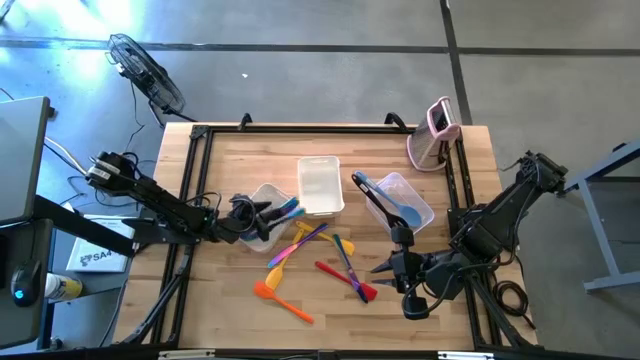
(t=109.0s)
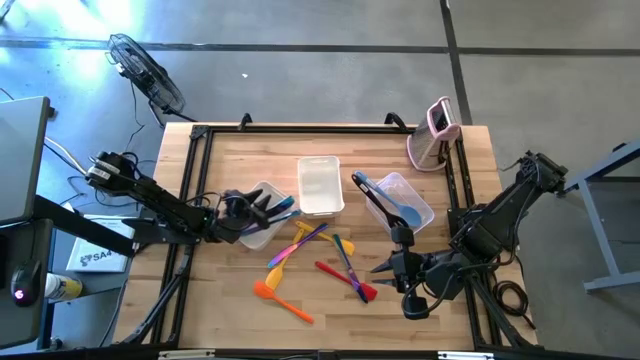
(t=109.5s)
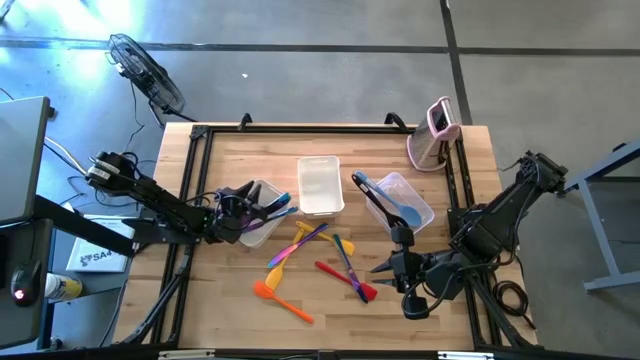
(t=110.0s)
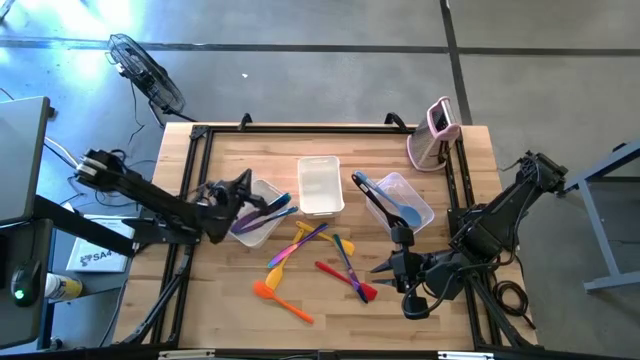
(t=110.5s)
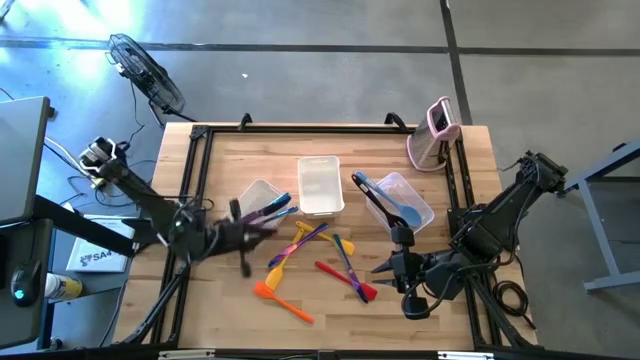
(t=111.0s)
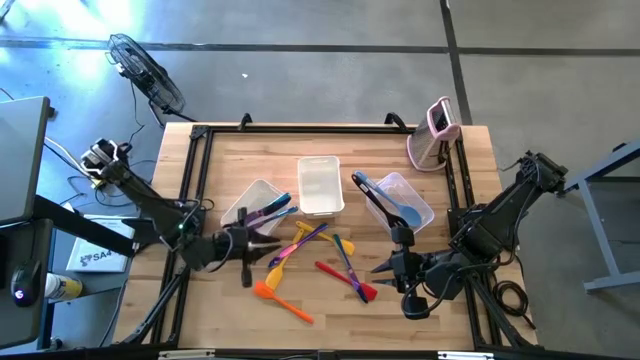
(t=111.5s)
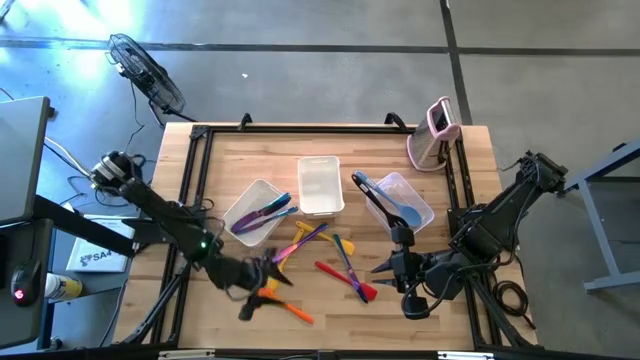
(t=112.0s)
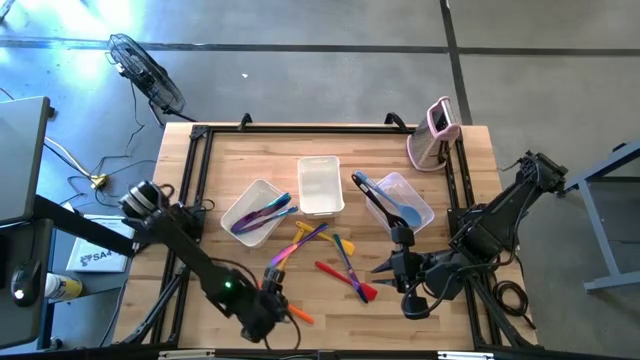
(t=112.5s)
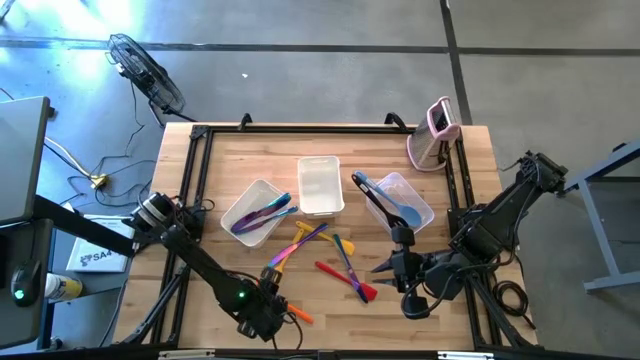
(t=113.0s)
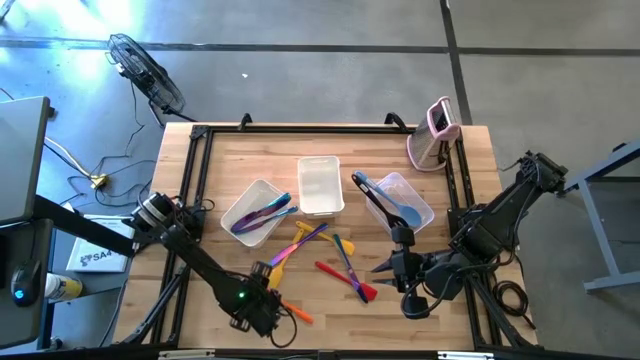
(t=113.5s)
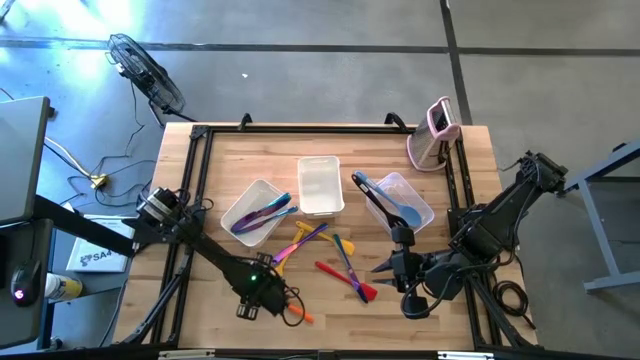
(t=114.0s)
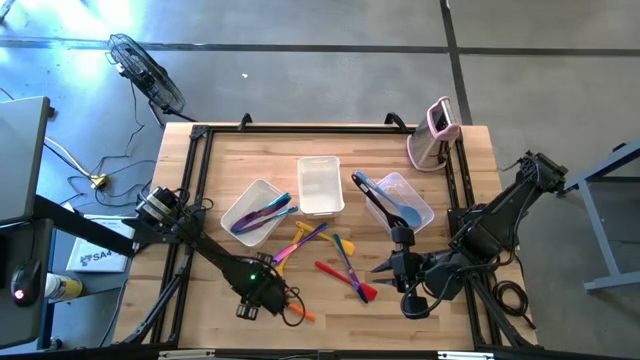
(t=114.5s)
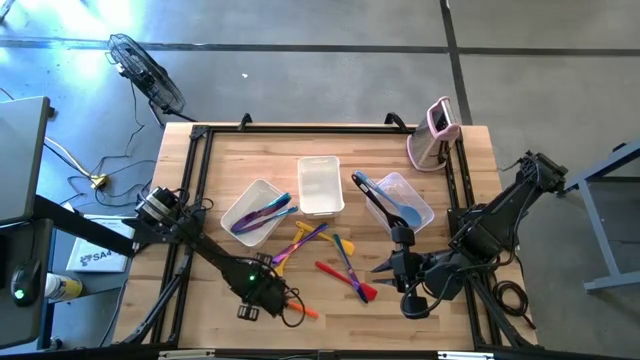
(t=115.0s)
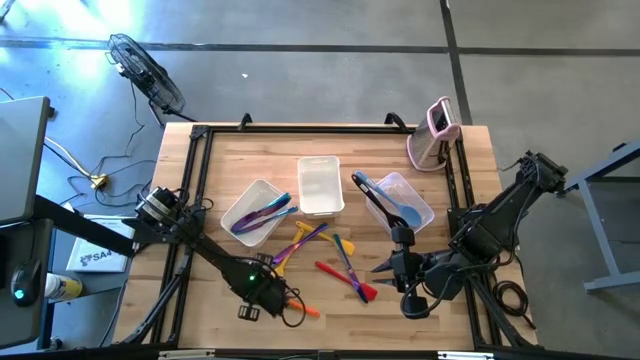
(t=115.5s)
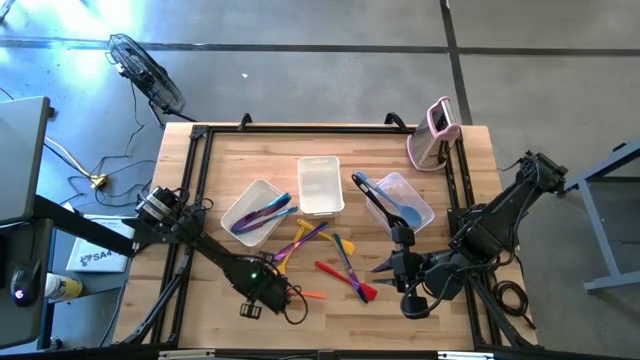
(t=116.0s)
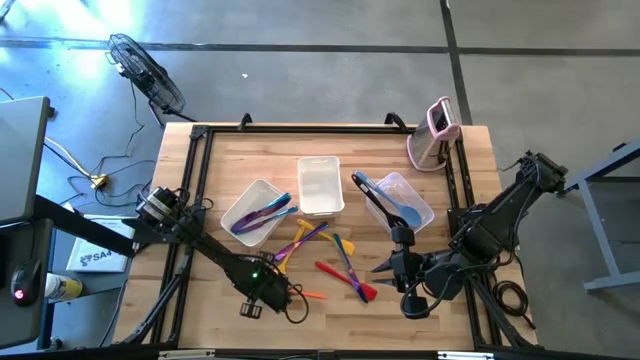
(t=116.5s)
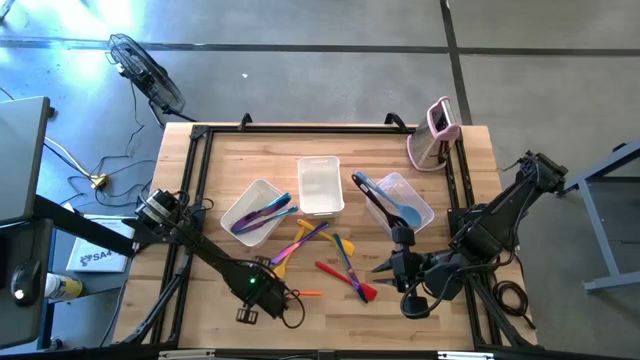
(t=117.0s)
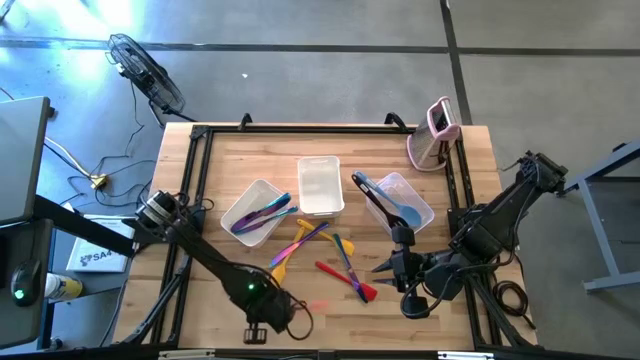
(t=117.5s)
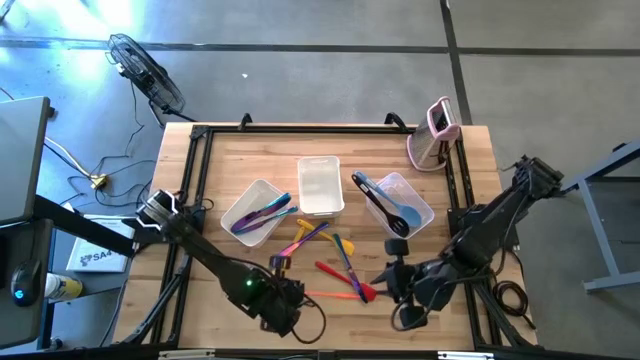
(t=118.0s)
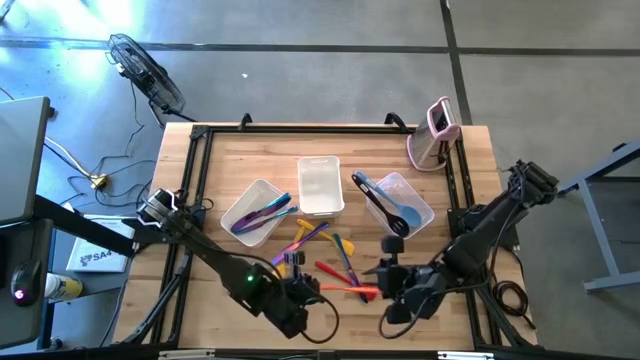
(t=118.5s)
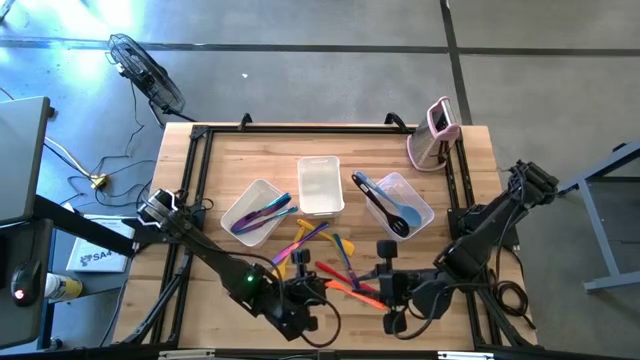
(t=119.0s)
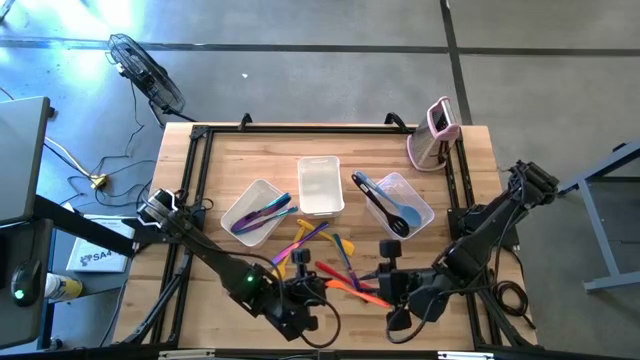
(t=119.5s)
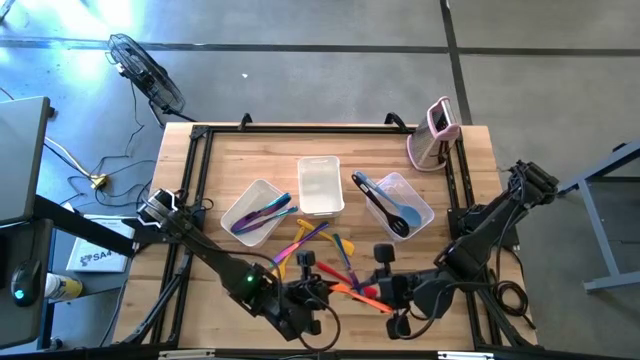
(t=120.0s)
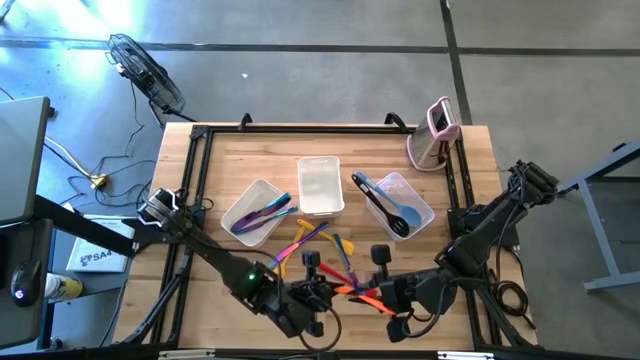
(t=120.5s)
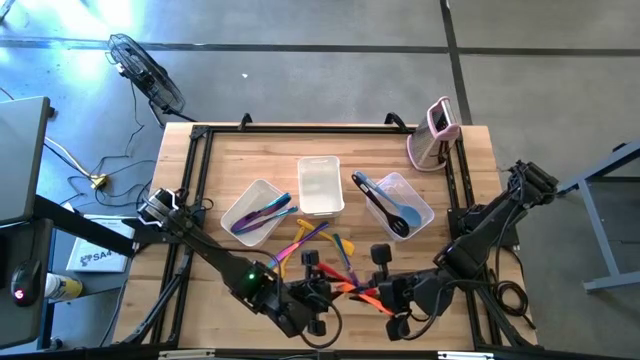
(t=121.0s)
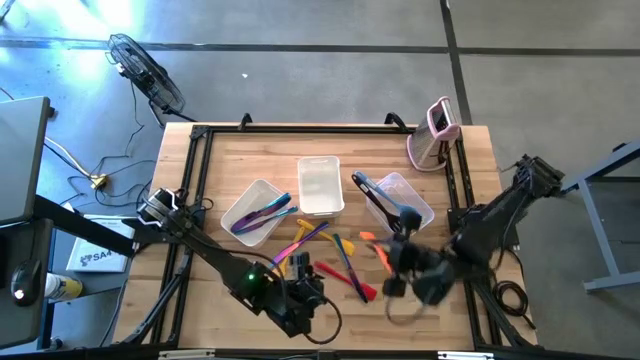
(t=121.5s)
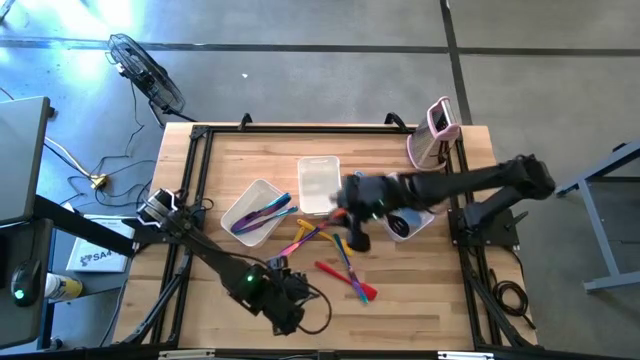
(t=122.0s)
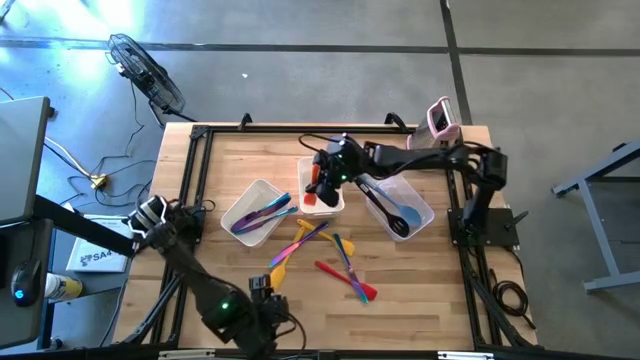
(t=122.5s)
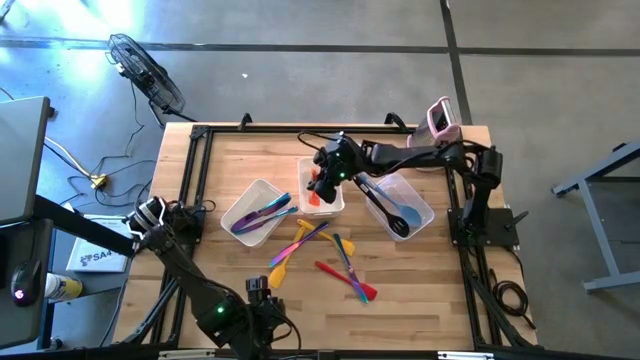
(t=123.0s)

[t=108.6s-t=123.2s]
Task: Pick & Place Kitchen Items
Put the orange spatula into the right white bin

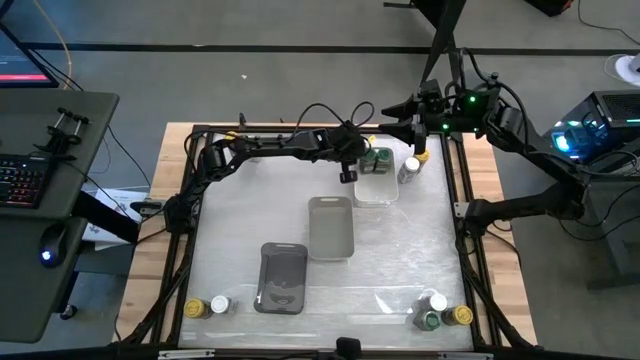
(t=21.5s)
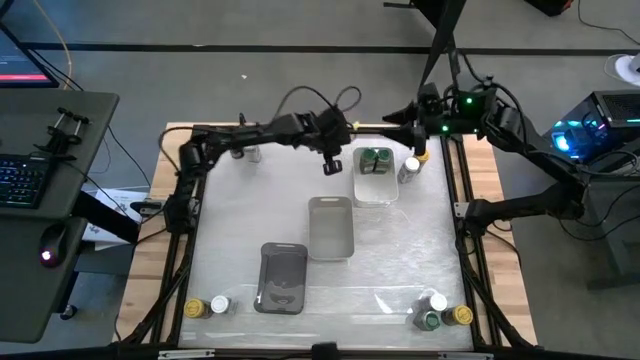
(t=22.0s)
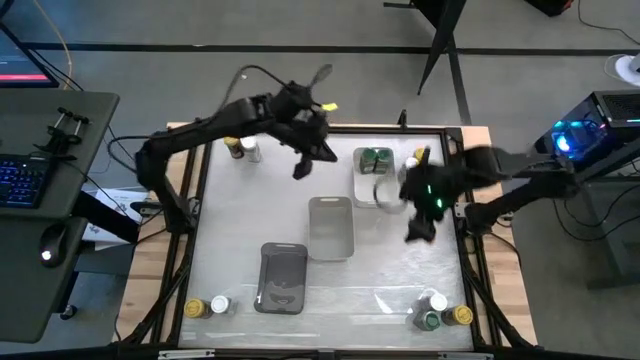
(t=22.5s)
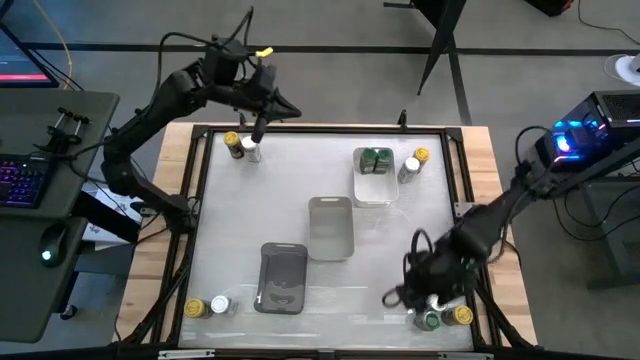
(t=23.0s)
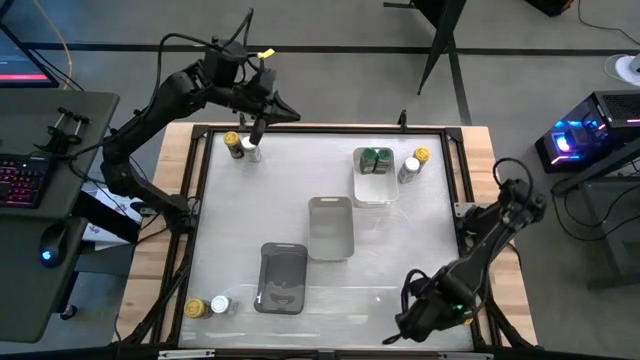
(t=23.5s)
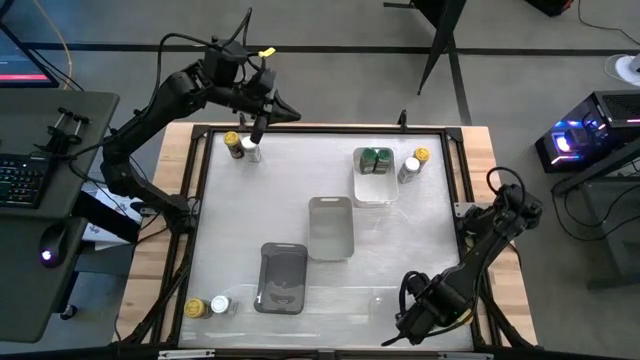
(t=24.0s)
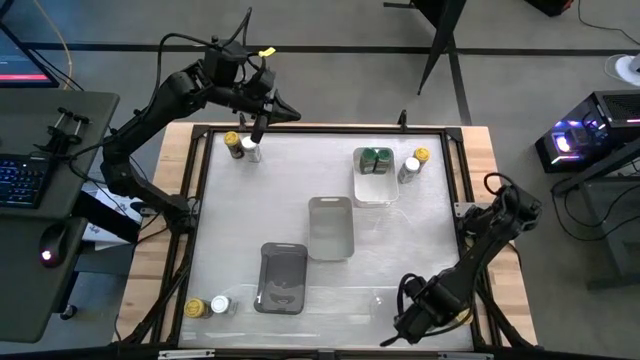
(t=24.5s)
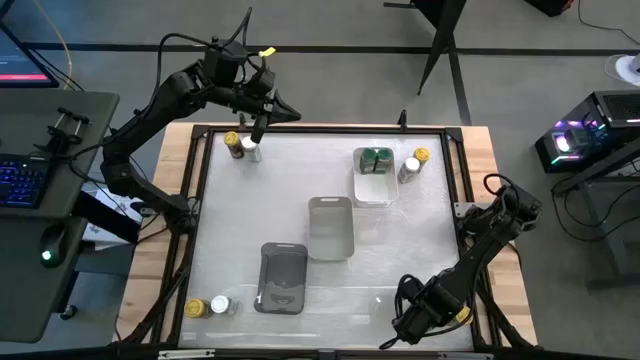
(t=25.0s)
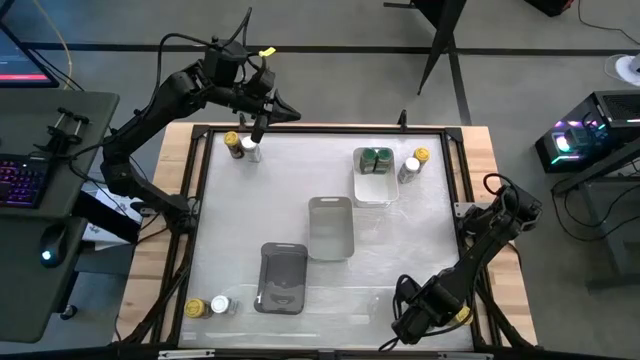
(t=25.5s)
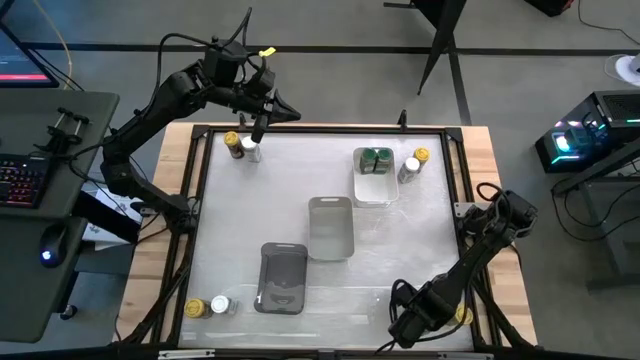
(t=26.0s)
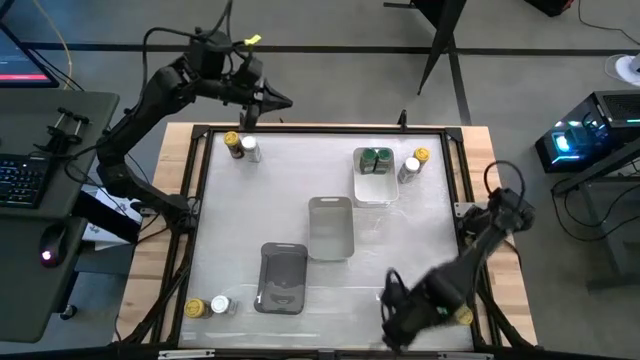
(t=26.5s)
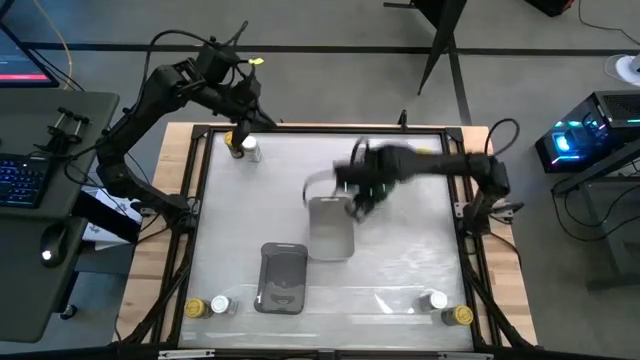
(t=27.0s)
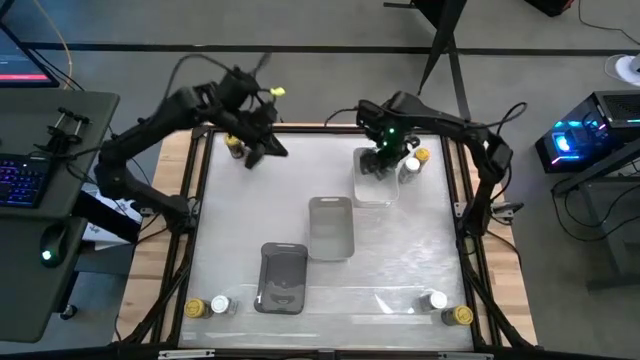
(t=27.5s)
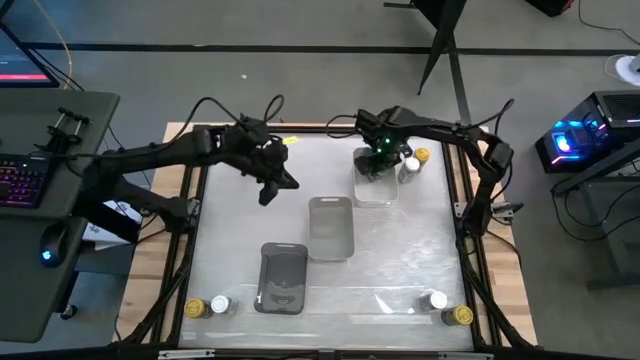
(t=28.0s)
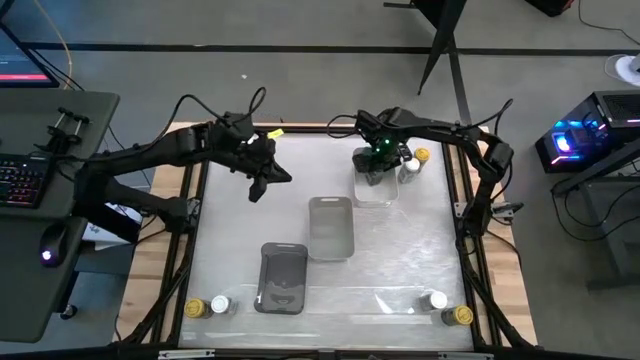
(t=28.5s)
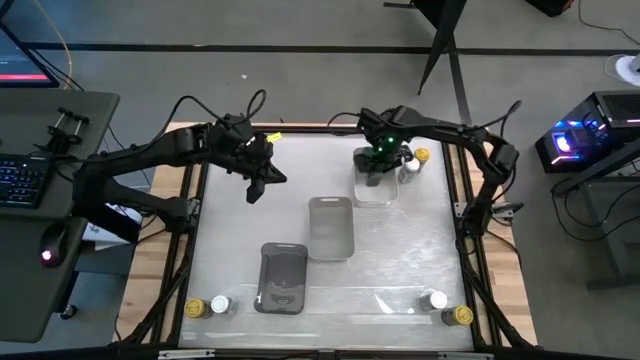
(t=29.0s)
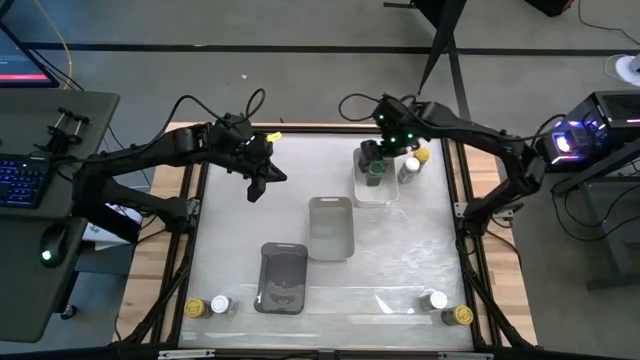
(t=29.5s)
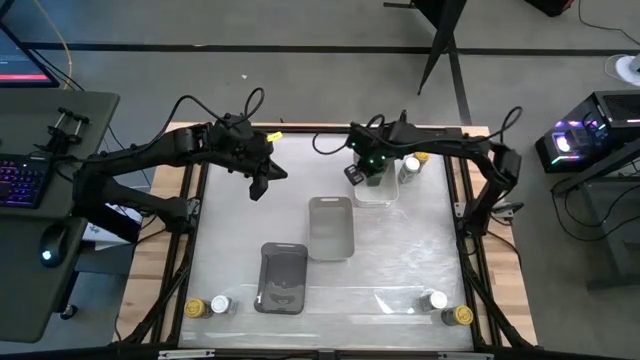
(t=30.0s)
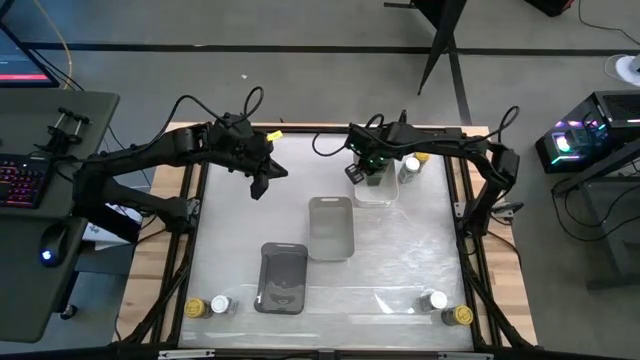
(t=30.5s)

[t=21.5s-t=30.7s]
Task: Sort spices by type
Put the green seasoning bottle into the white bin
